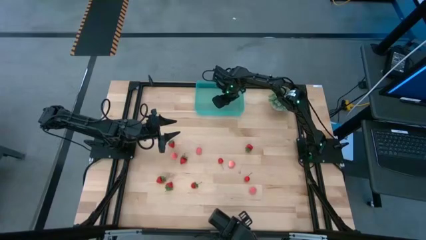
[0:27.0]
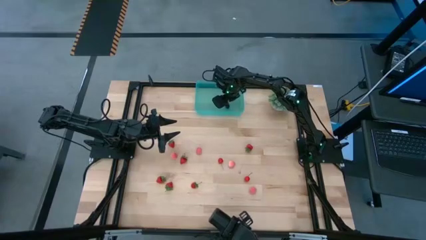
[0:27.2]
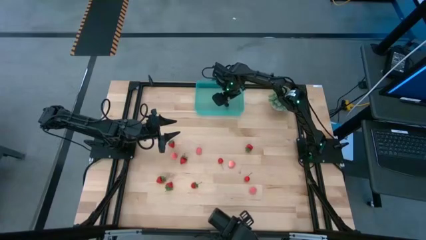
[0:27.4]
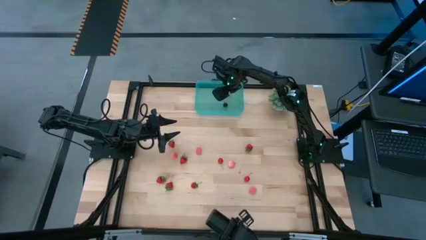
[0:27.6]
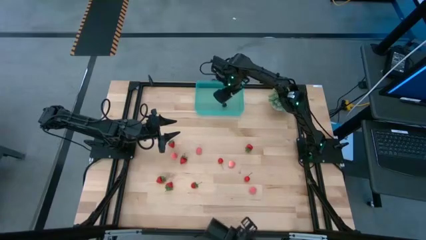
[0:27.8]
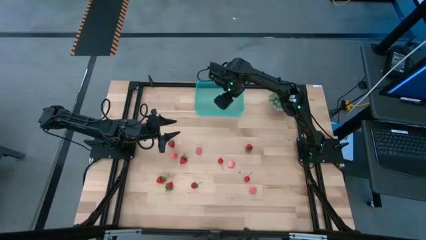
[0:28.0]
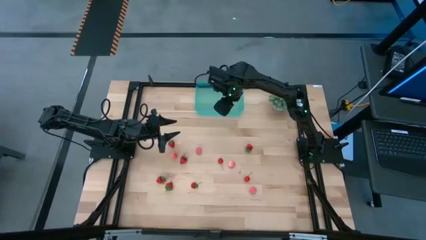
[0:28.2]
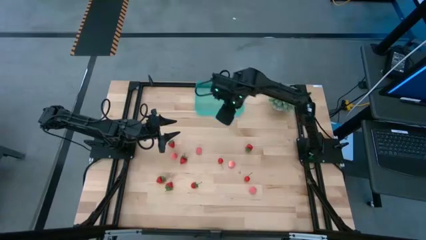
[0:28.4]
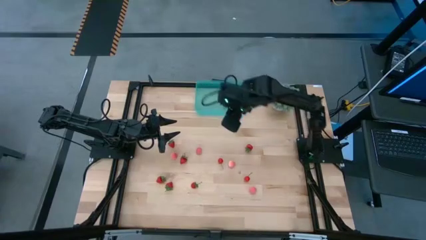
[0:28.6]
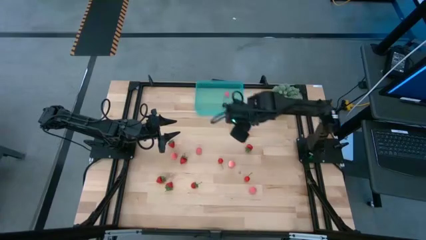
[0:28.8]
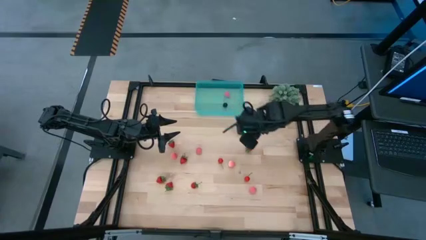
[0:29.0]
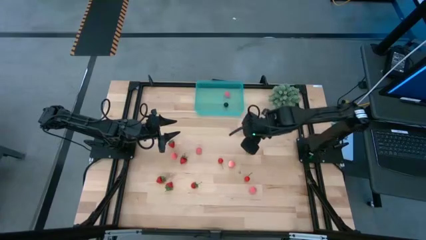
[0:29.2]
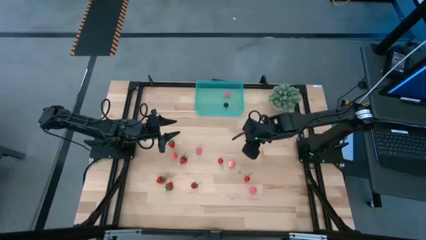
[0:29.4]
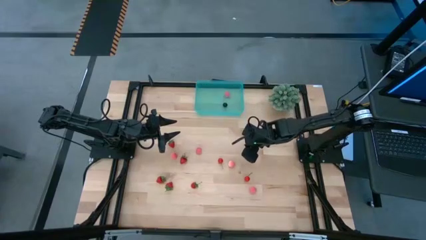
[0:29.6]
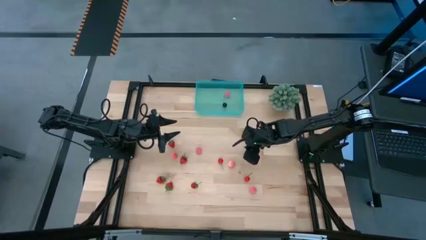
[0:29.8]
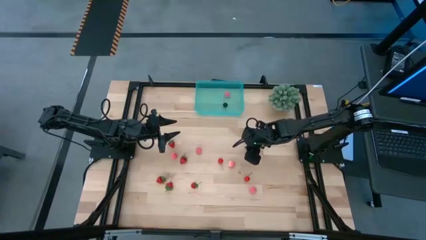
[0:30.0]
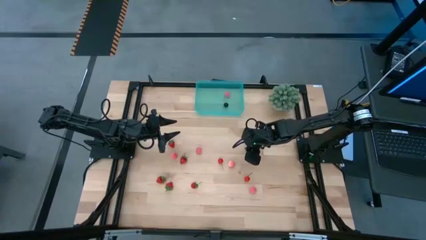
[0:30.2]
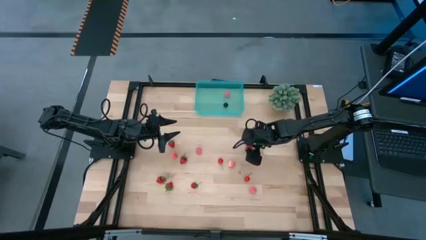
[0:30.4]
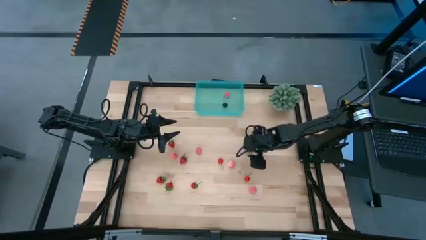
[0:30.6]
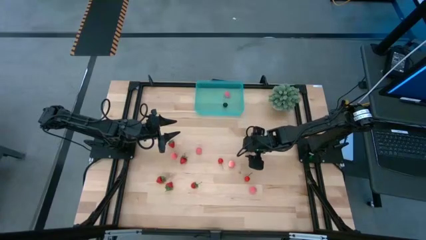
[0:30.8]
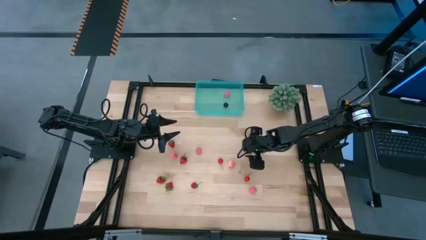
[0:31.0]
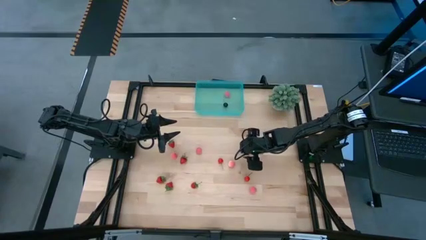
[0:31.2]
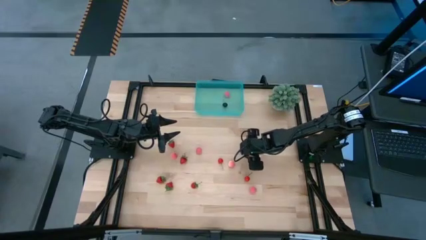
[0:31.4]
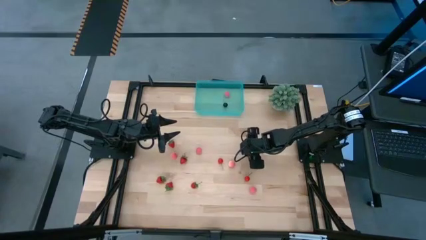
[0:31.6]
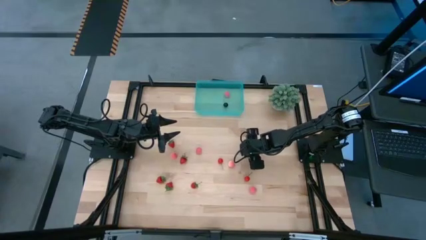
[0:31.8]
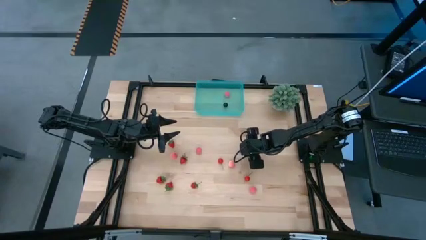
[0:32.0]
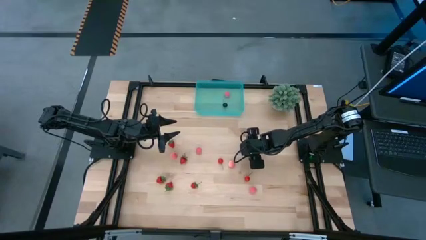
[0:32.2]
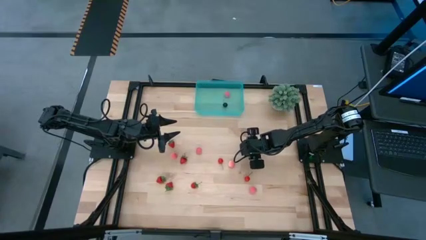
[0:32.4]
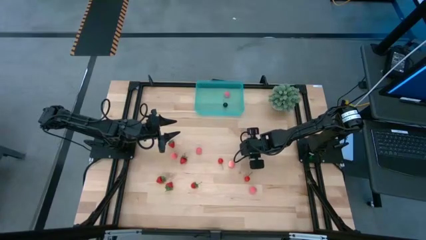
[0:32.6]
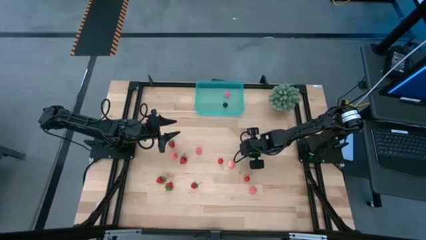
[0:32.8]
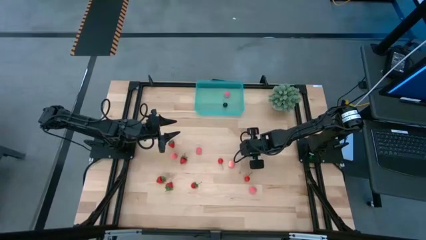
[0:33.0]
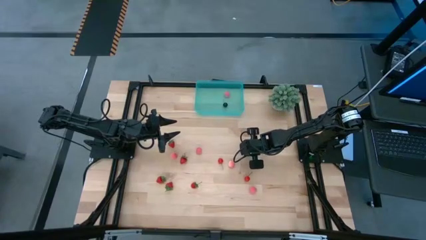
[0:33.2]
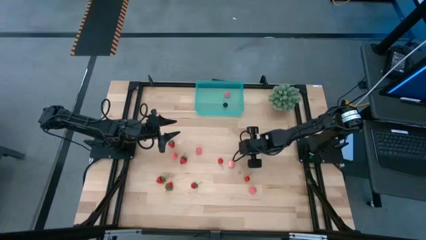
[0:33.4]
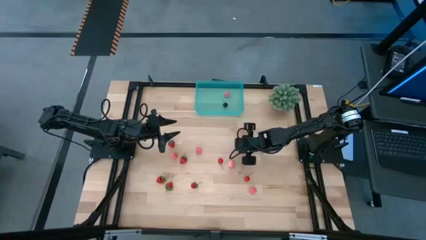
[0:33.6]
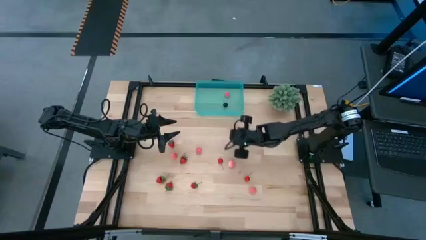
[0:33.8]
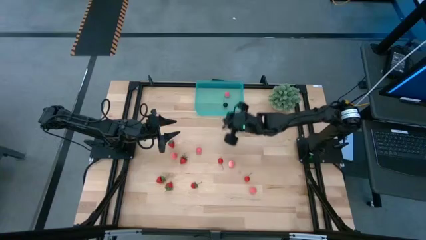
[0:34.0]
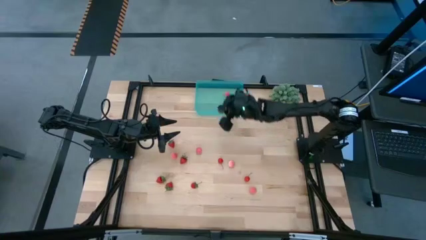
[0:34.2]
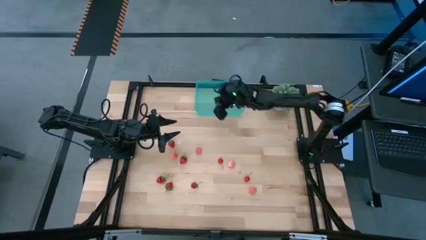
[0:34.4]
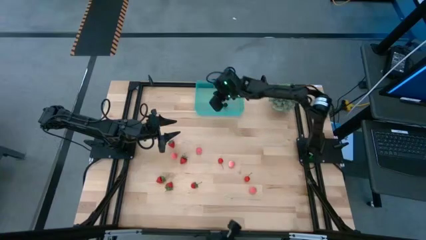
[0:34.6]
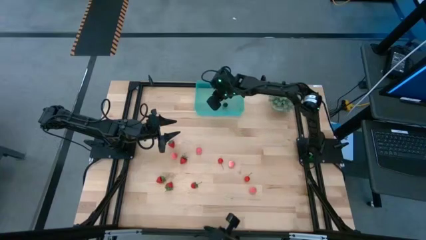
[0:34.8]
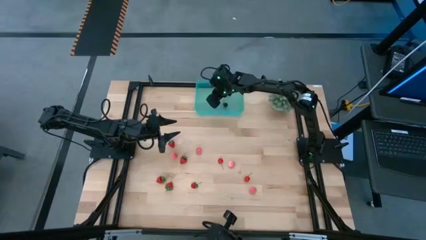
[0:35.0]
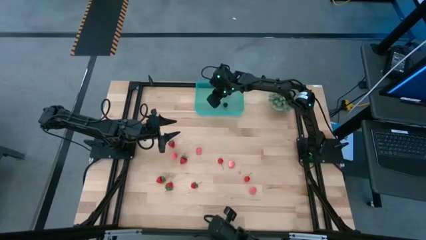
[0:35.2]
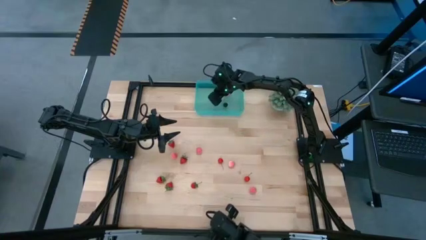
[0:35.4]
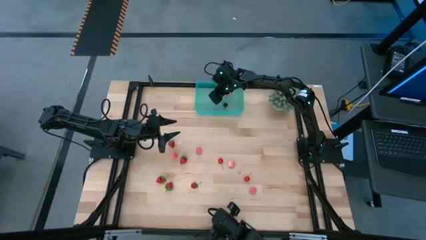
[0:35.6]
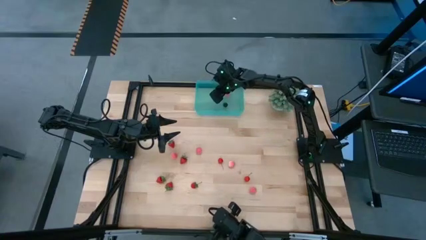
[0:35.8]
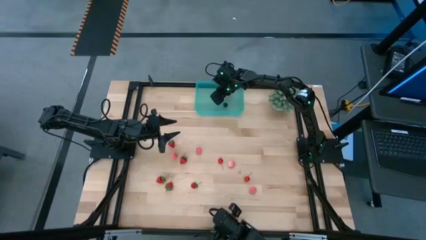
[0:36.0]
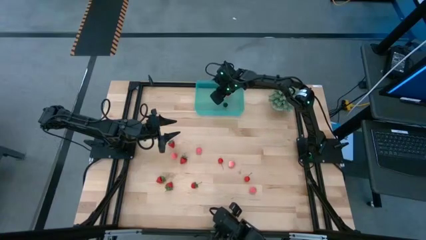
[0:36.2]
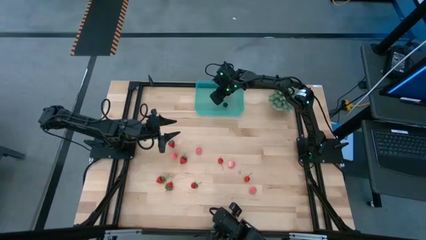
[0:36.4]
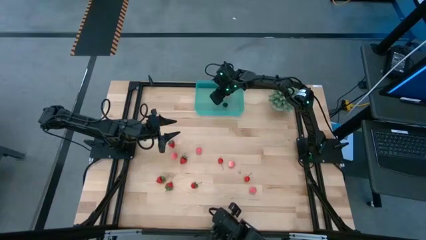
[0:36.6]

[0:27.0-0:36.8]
Task: Pick and placing Produce into tupperware
Put the strawberry into the blue basket

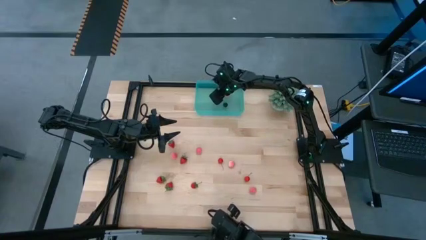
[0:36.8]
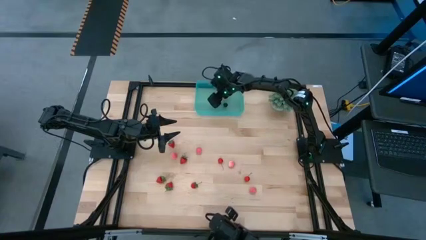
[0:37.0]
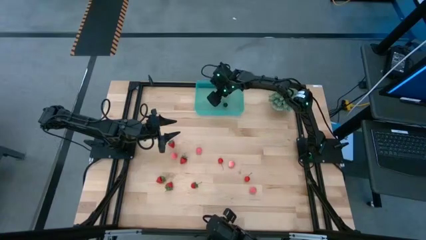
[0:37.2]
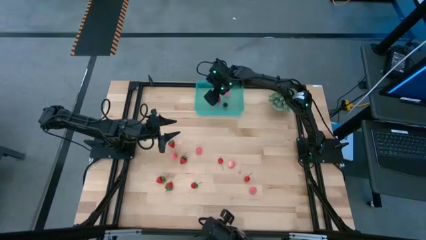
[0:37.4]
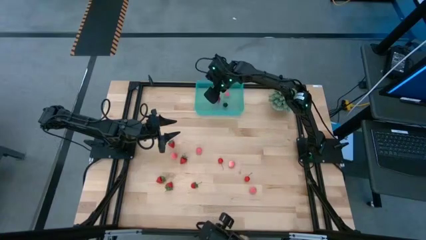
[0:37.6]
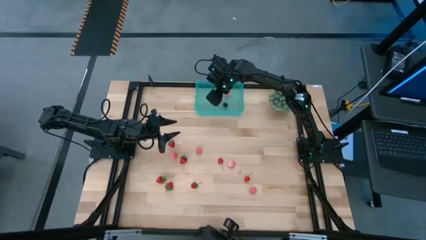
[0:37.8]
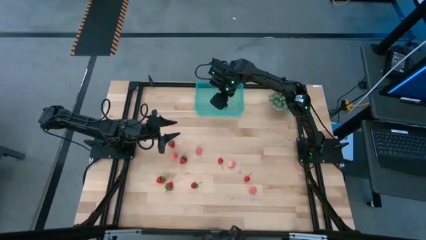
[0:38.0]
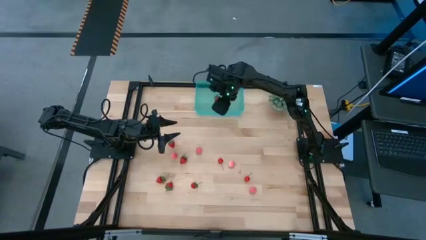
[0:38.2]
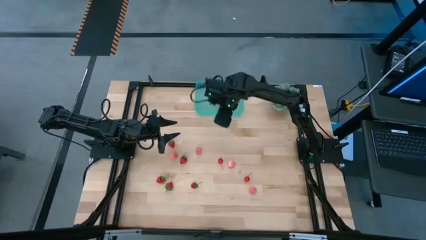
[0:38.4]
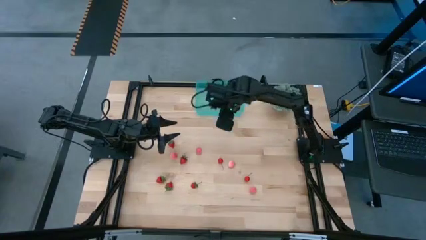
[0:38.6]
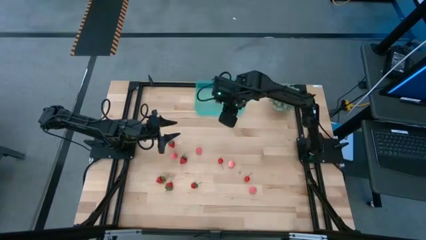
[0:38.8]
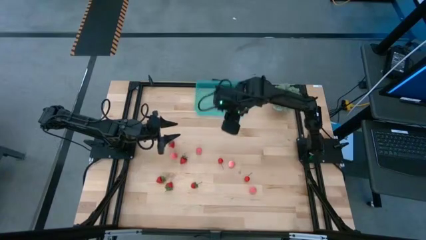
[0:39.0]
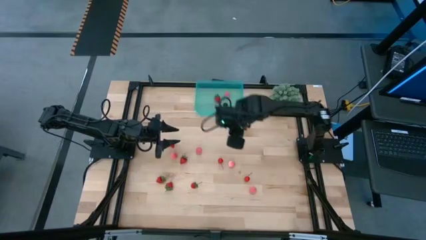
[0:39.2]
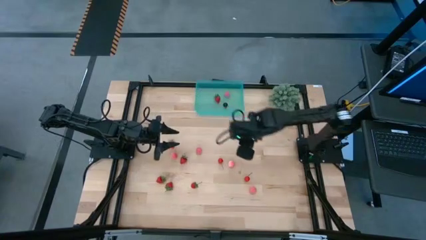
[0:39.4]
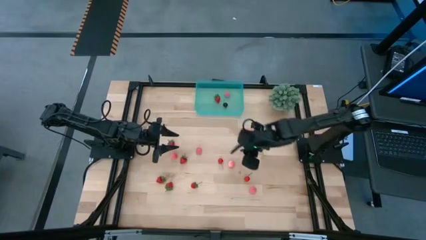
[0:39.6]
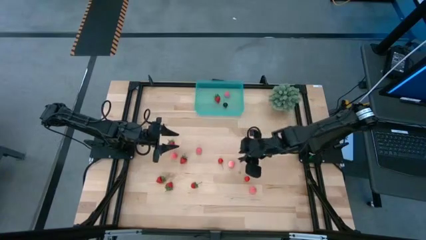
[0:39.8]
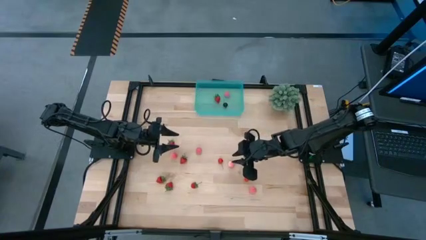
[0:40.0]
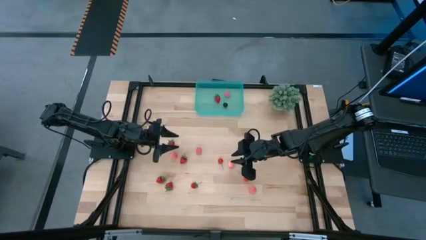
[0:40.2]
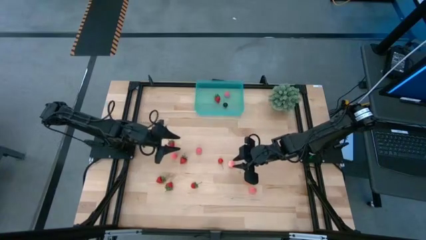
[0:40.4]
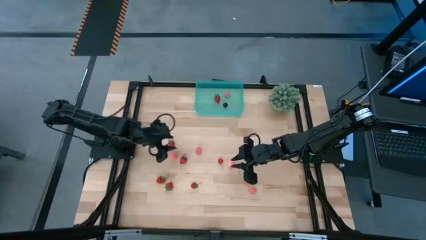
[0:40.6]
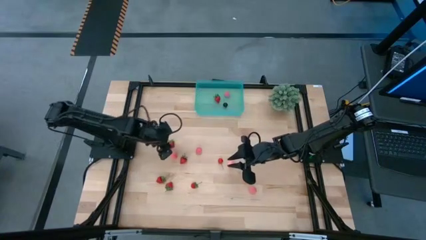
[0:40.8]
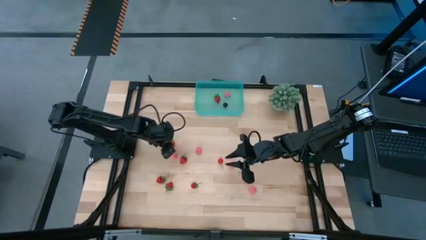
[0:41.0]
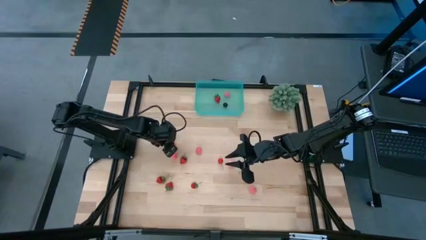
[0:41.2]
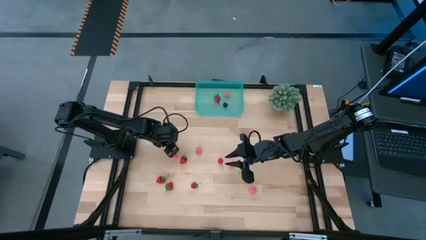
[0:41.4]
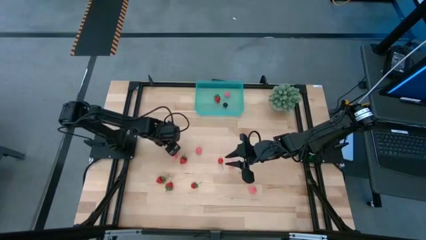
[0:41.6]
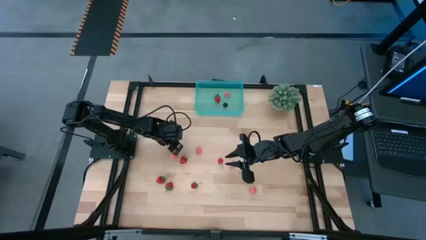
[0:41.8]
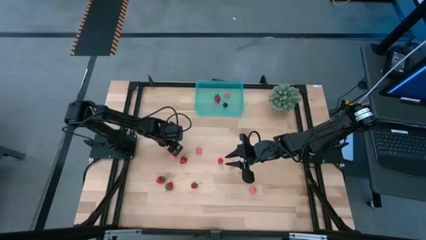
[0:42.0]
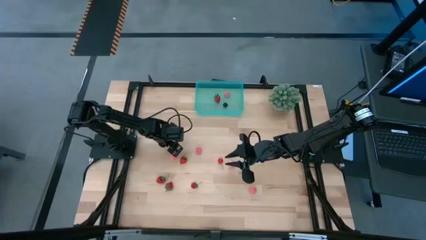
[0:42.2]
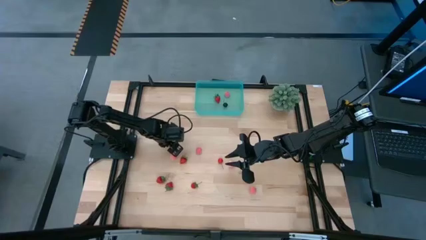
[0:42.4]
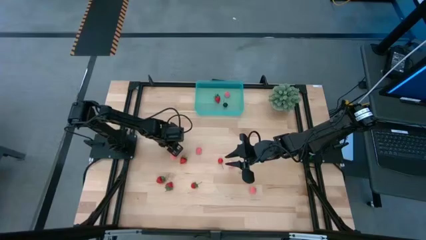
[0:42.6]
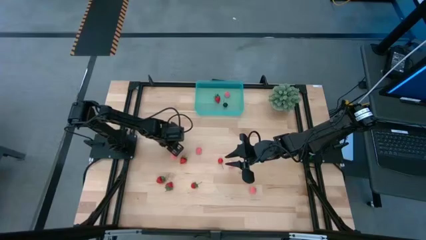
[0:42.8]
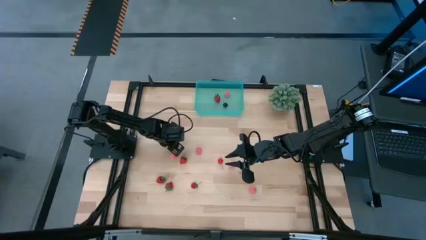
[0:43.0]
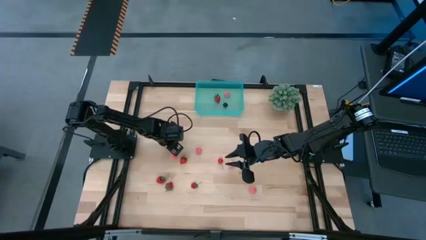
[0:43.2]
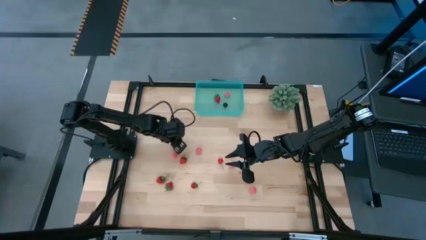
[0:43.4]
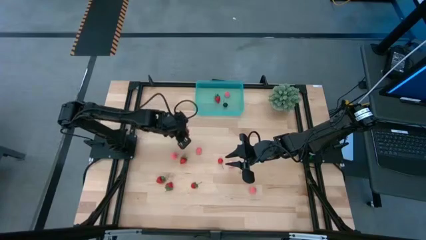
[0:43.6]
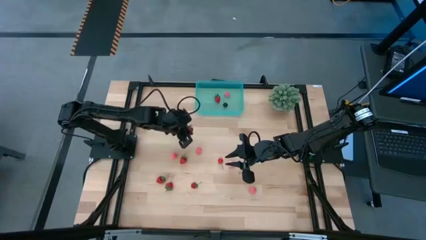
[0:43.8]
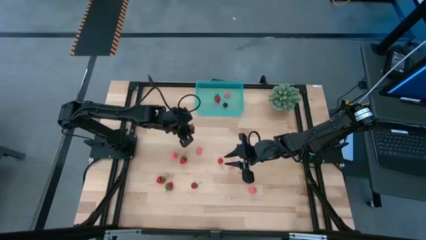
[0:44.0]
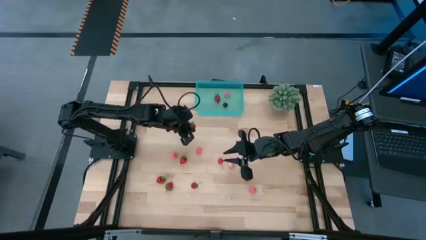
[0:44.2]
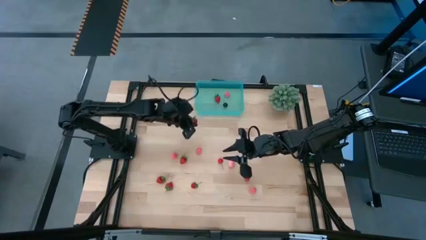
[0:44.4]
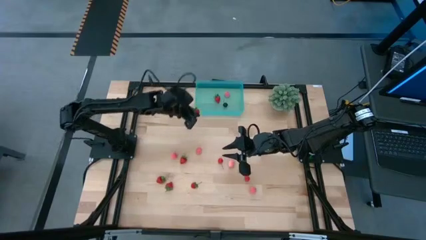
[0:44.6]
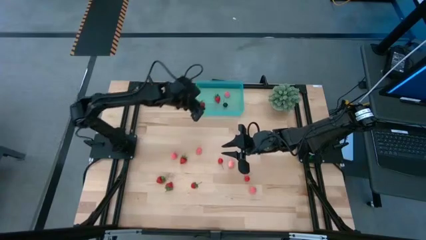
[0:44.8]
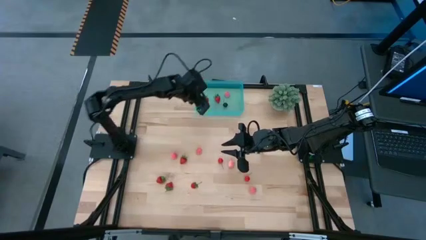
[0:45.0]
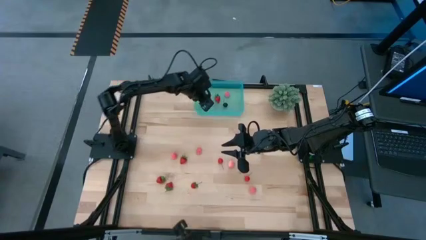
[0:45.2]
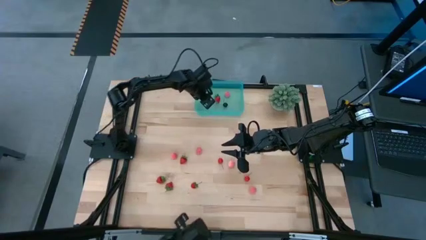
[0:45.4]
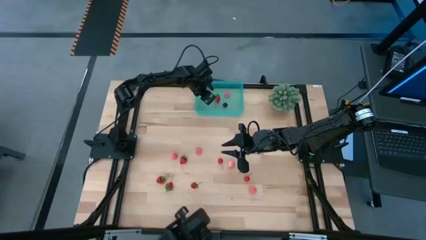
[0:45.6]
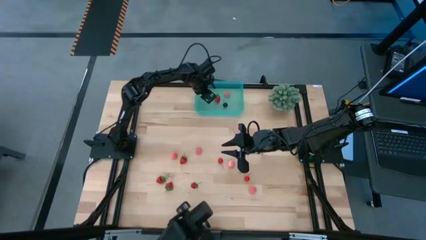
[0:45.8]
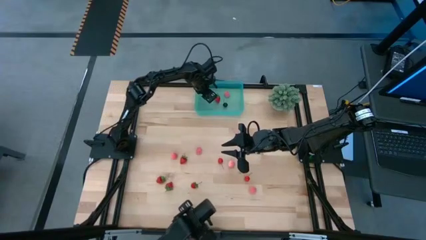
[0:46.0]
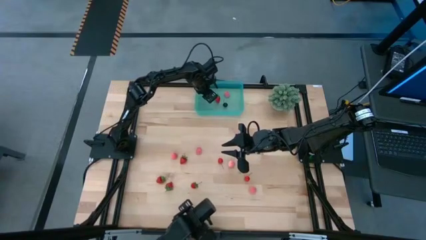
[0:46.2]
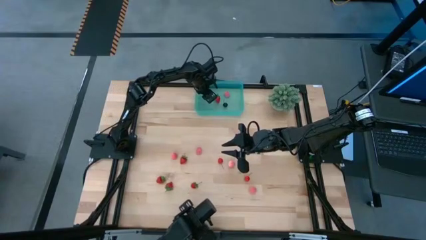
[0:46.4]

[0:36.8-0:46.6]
Put the strawberry into the blue basket
